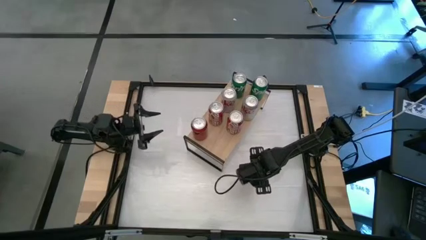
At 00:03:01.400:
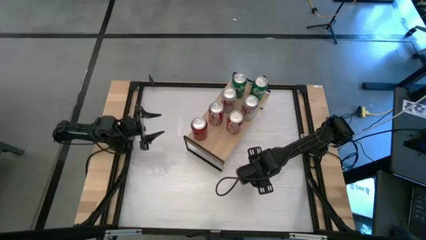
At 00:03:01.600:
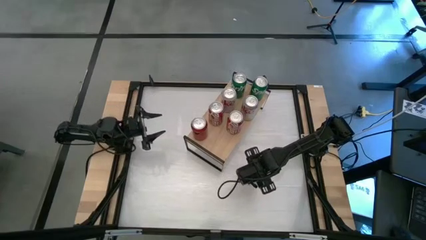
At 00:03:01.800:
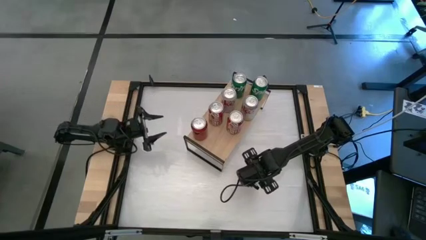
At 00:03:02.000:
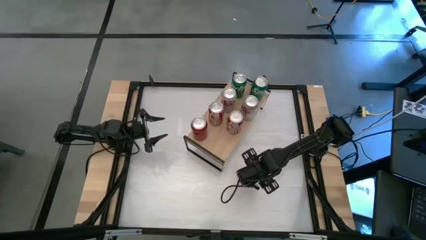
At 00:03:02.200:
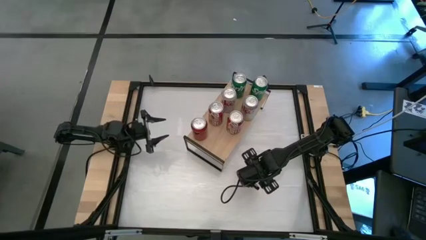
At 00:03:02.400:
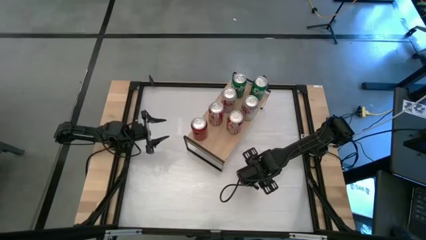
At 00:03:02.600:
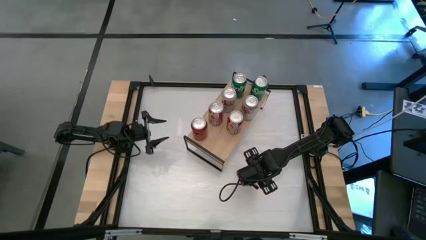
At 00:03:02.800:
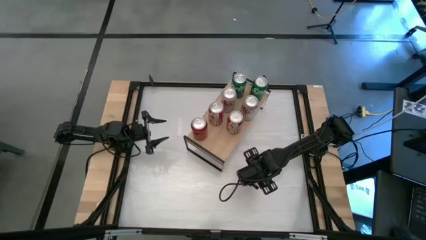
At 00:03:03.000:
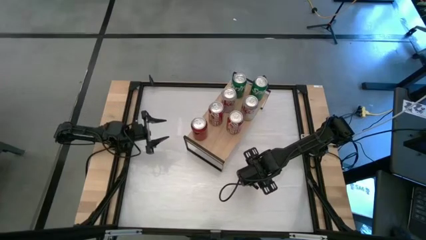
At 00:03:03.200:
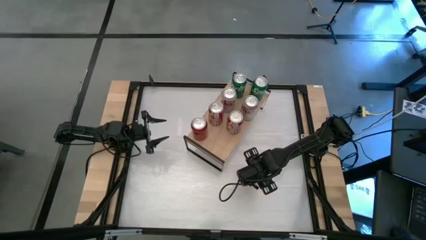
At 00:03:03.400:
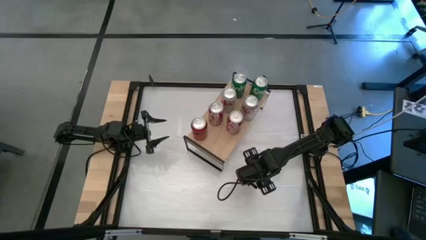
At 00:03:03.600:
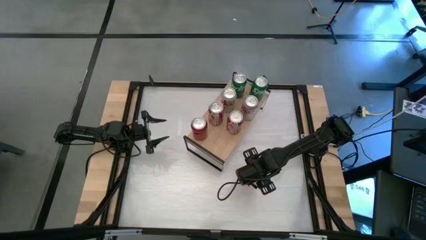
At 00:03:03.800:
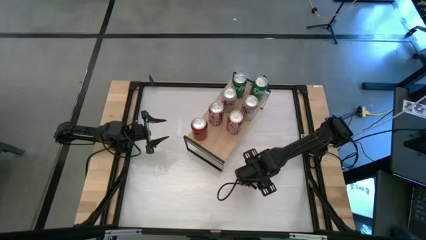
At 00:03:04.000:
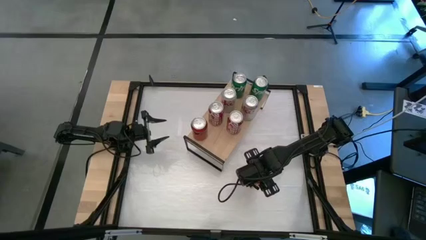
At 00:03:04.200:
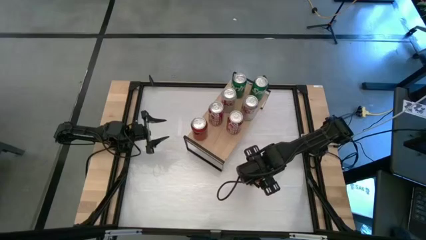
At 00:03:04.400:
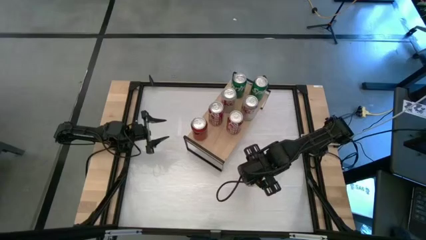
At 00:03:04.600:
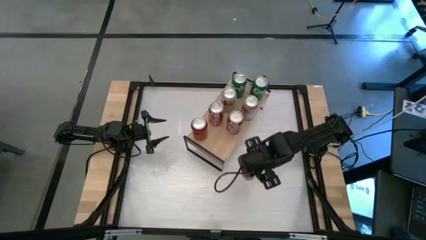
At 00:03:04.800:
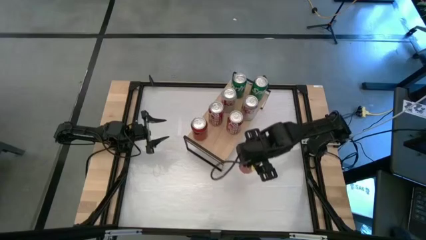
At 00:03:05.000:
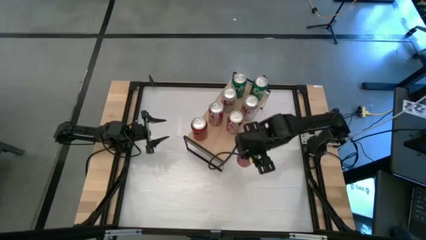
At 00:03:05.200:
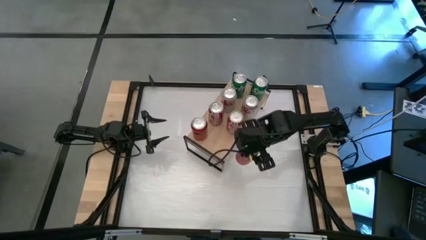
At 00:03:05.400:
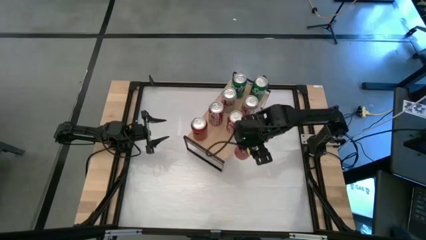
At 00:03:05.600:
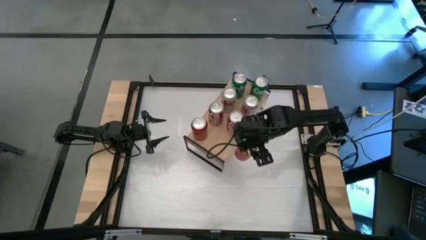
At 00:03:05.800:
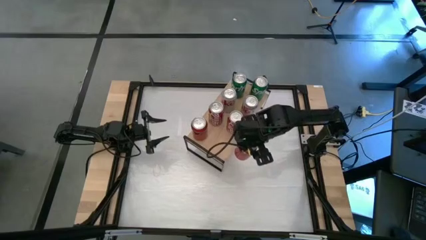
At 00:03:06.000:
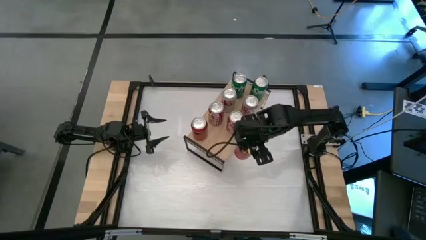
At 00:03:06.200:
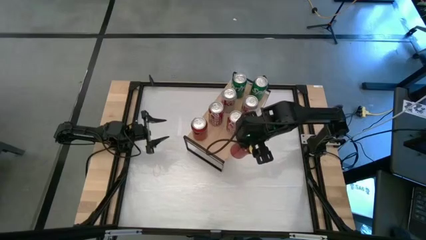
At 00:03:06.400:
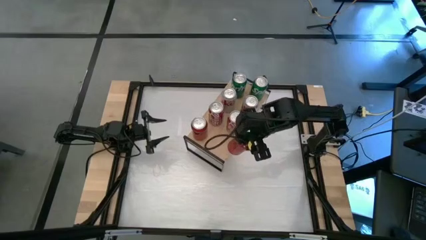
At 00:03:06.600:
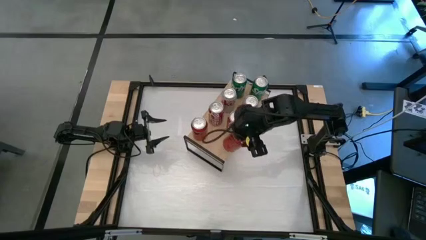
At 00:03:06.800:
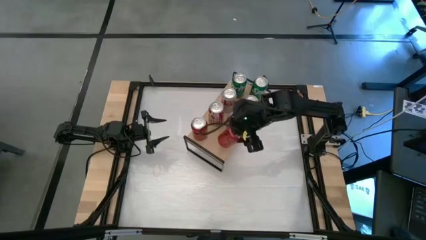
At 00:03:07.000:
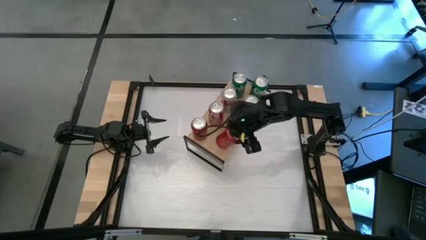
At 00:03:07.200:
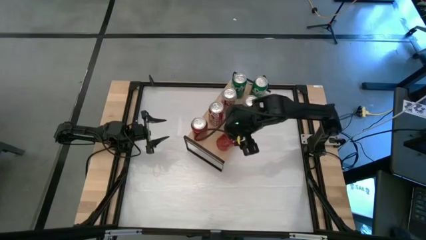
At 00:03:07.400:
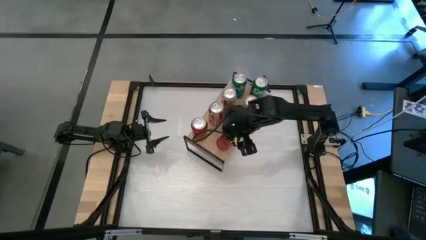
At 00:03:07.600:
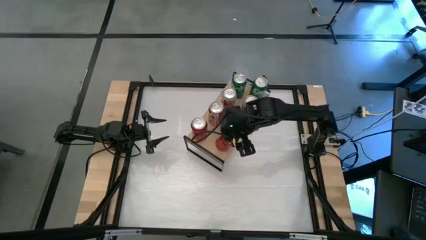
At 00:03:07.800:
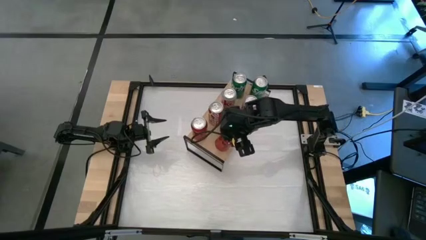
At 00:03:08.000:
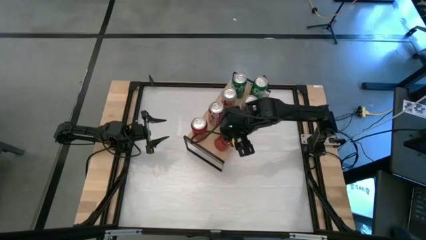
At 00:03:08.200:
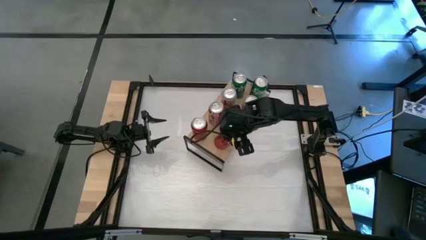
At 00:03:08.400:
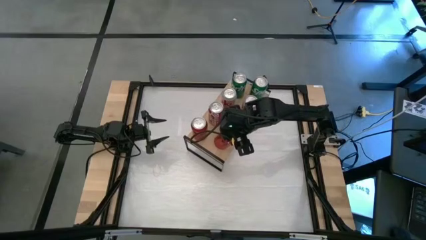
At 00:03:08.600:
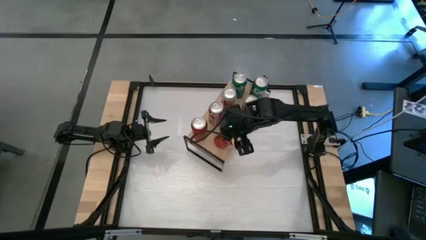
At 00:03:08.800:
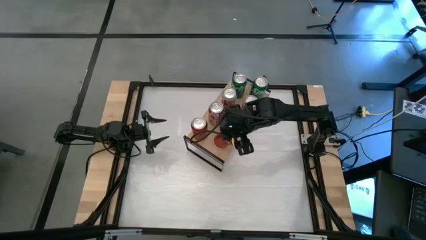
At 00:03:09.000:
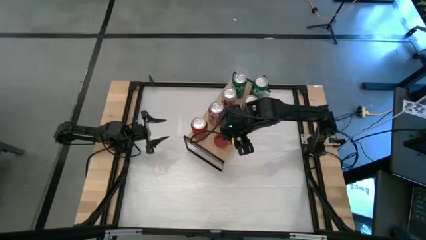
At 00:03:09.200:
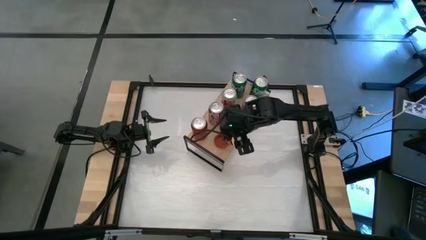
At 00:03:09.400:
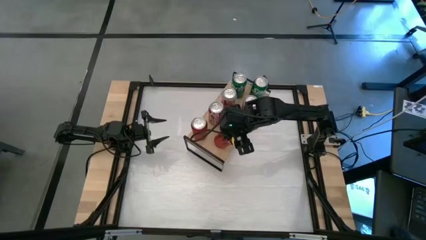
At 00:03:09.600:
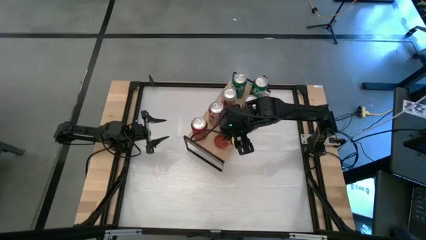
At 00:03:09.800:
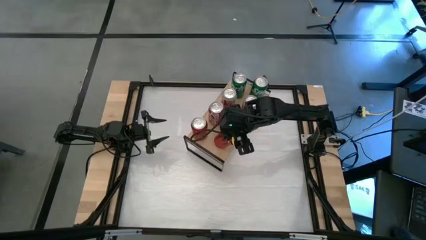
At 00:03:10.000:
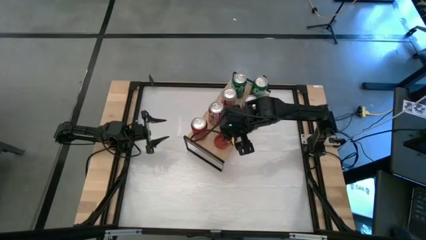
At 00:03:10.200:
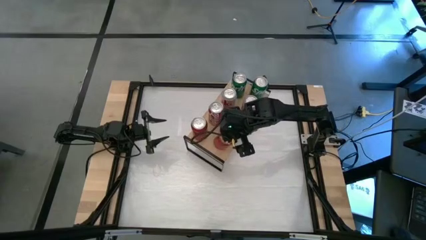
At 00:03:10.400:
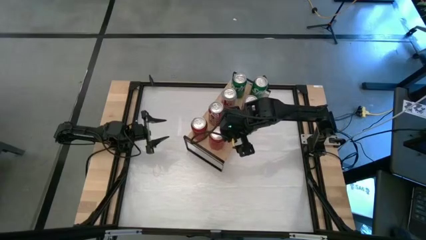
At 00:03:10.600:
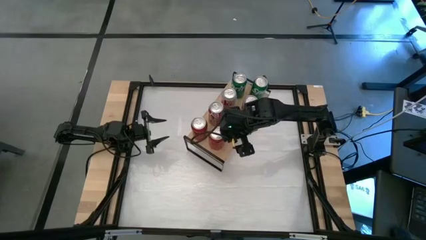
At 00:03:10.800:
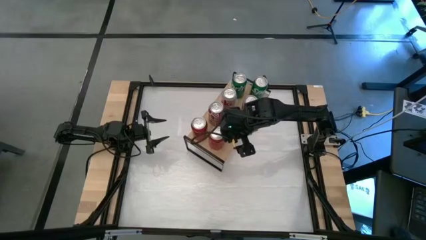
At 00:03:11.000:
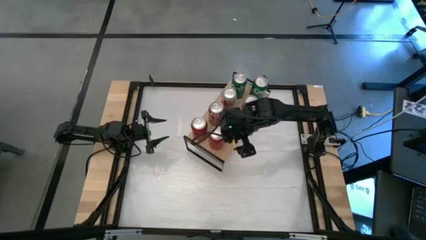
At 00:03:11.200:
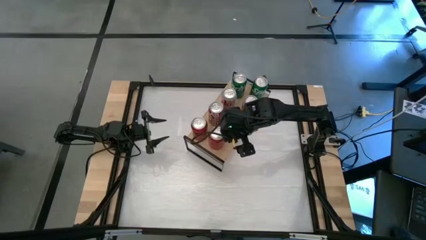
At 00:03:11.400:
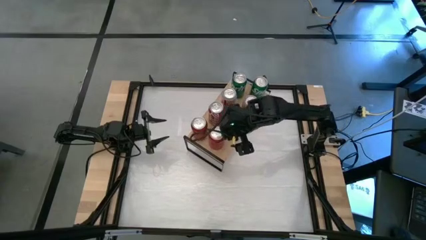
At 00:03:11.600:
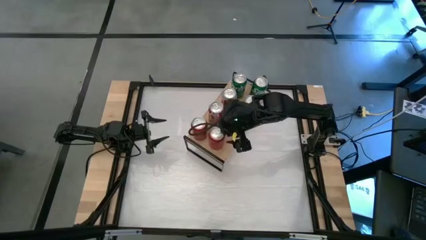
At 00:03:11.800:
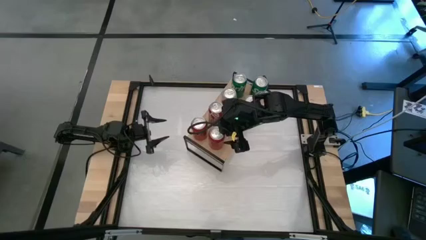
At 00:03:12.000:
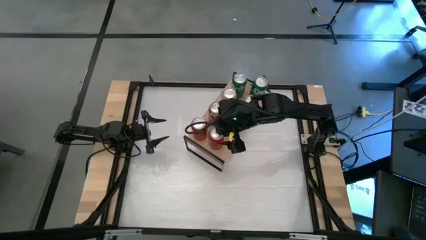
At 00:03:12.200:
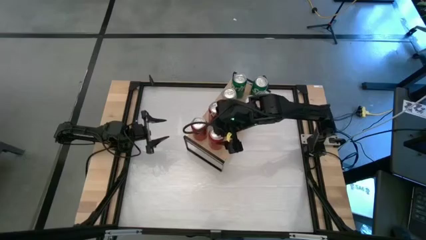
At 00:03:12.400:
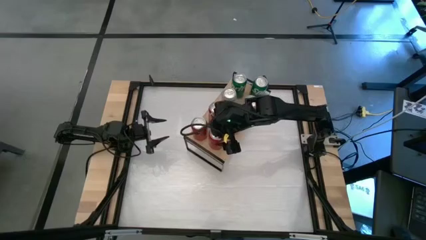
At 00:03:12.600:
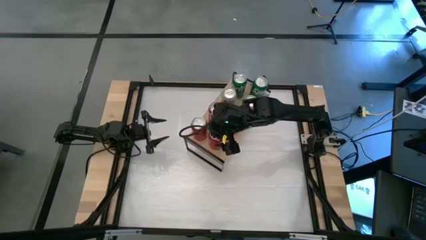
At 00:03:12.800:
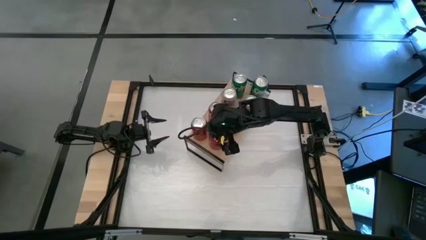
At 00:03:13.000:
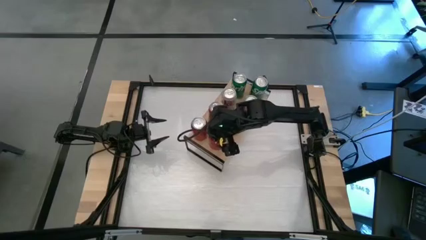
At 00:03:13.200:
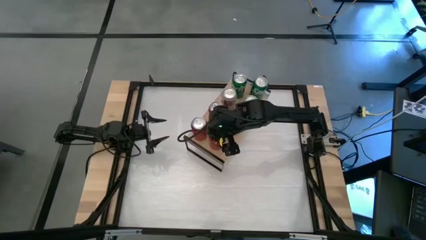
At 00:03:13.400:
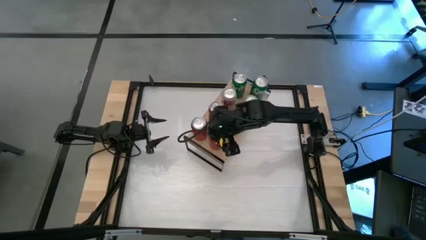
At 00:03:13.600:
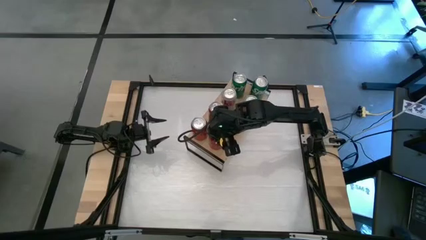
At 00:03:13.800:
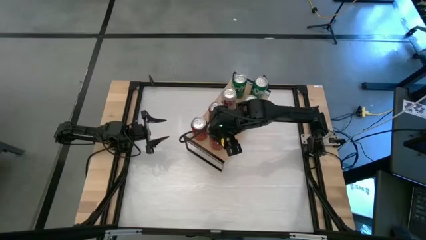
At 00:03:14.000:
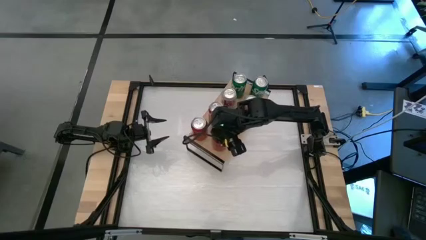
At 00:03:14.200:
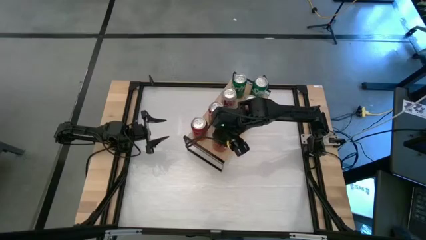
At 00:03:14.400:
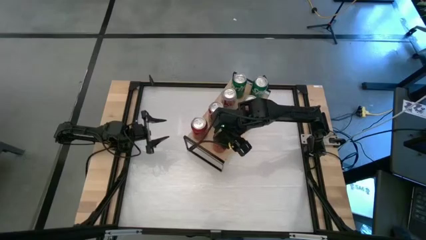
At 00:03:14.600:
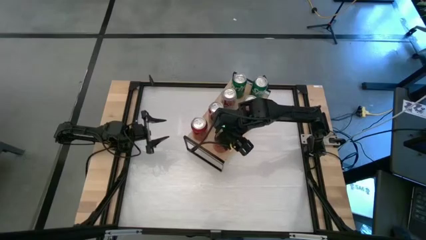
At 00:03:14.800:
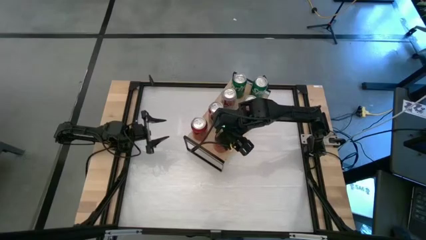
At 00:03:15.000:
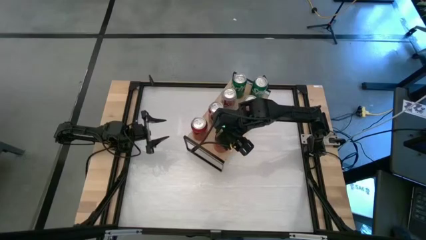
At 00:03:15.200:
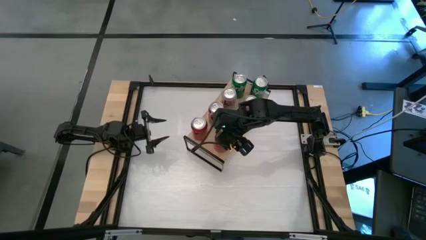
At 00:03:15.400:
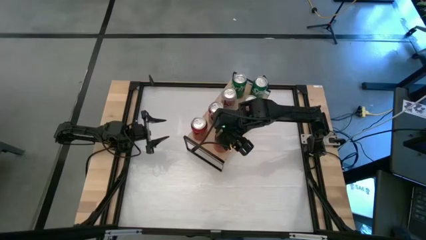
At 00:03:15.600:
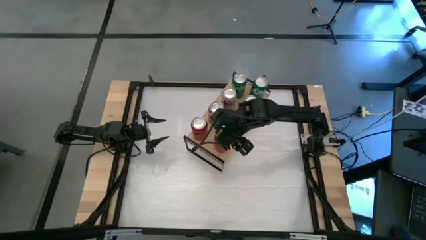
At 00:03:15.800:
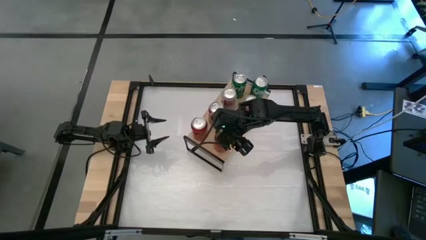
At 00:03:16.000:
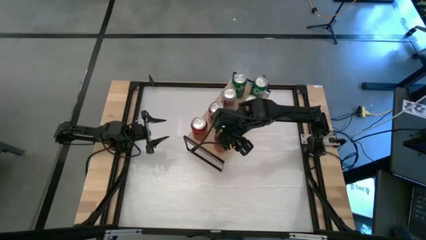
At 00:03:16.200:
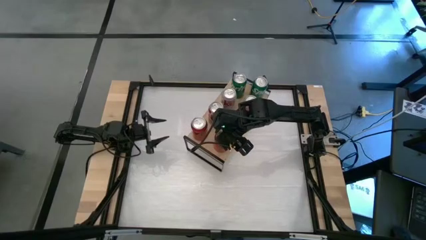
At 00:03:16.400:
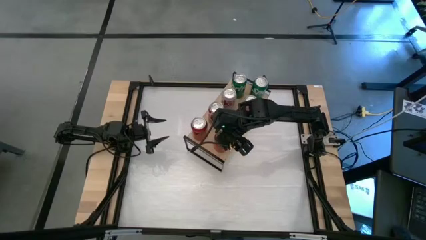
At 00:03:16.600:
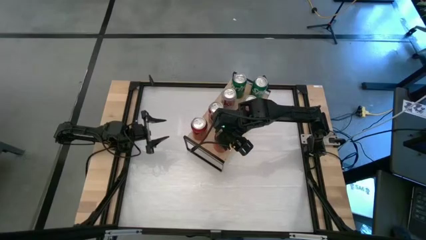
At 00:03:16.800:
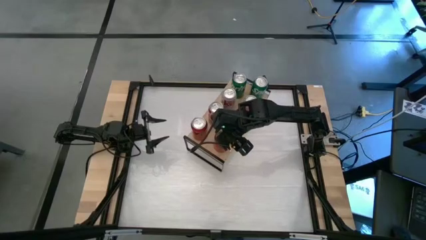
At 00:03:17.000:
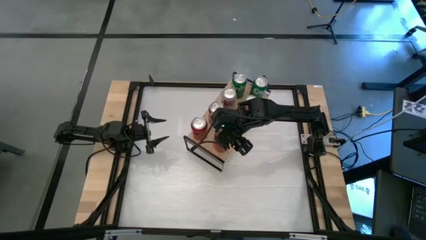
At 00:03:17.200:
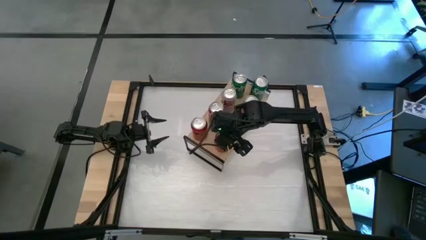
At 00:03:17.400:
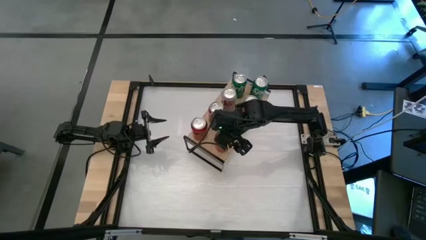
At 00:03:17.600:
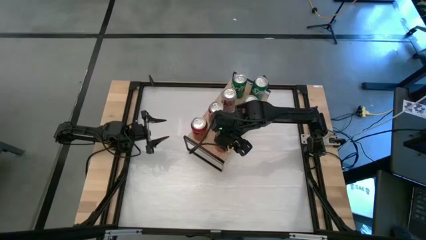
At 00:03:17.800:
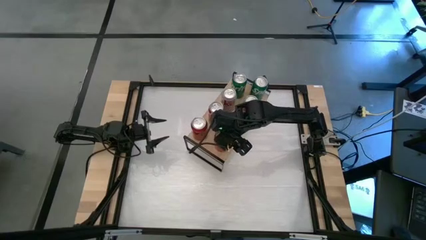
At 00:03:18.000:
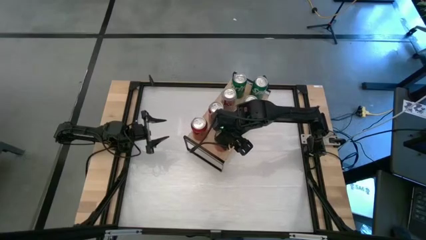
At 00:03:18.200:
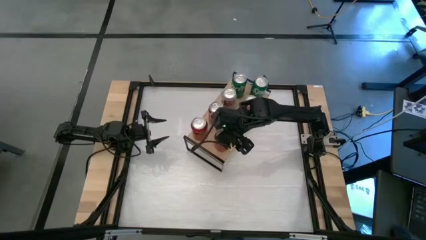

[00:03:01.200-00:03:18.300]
Task: Place canned beverage on shelf
Put the red-black soda can on the shelf aligned with the other red-black soda can
